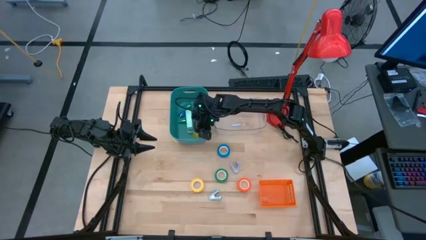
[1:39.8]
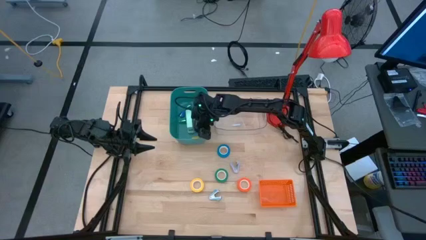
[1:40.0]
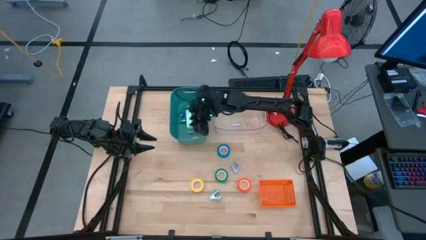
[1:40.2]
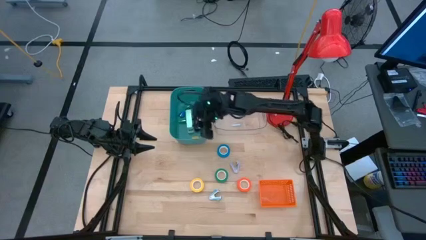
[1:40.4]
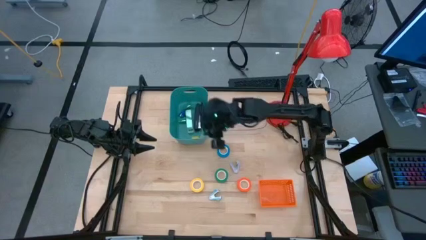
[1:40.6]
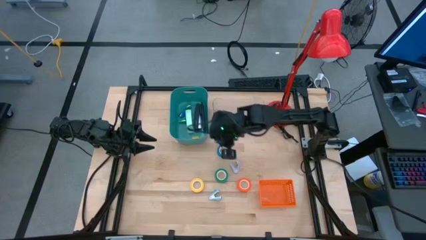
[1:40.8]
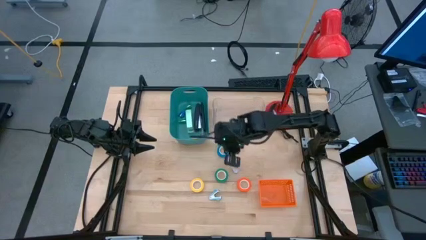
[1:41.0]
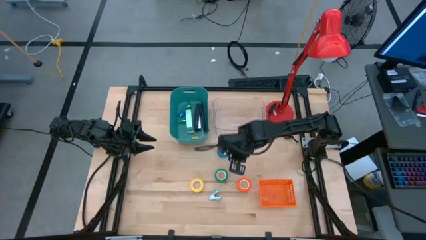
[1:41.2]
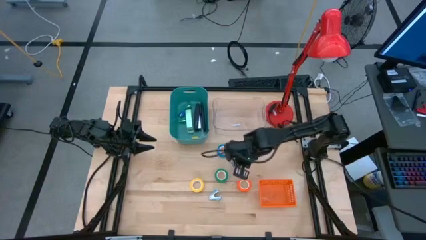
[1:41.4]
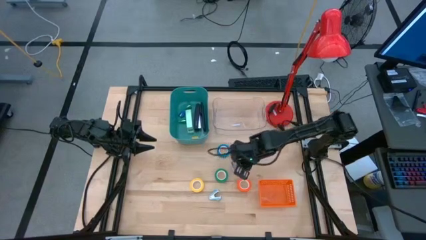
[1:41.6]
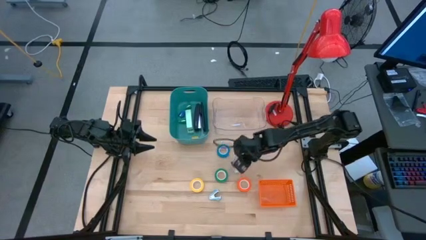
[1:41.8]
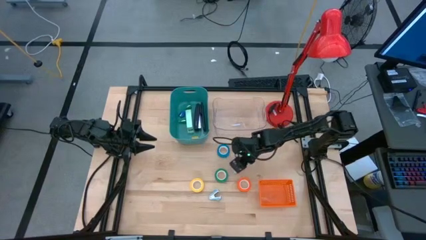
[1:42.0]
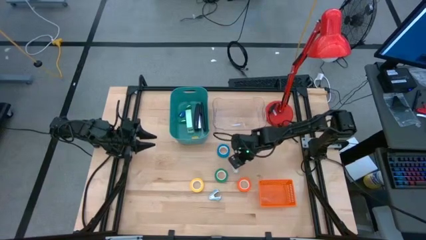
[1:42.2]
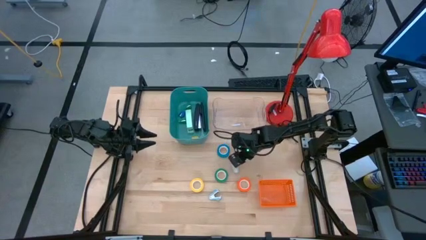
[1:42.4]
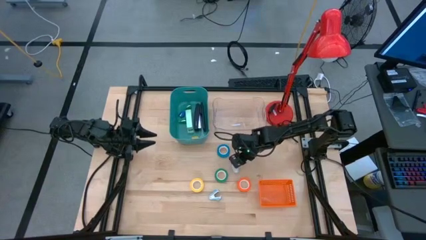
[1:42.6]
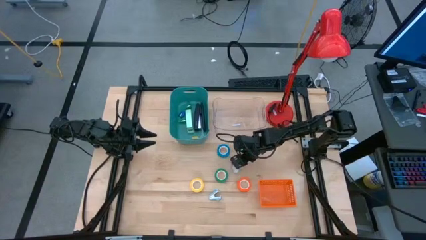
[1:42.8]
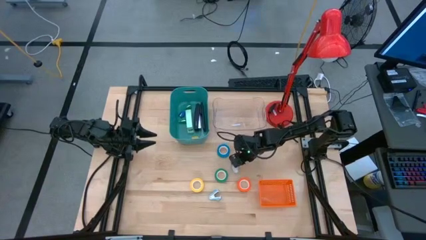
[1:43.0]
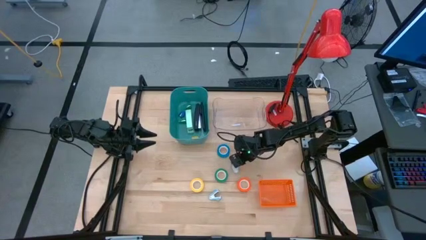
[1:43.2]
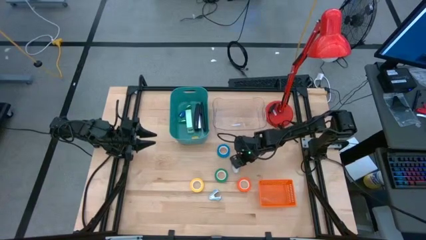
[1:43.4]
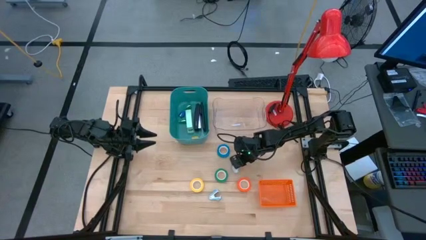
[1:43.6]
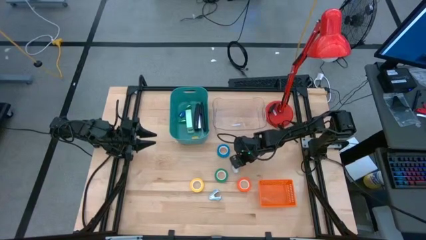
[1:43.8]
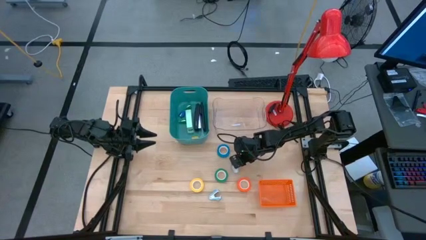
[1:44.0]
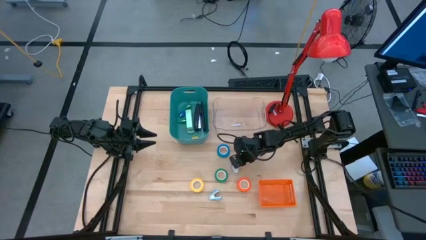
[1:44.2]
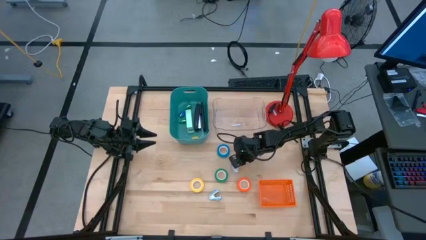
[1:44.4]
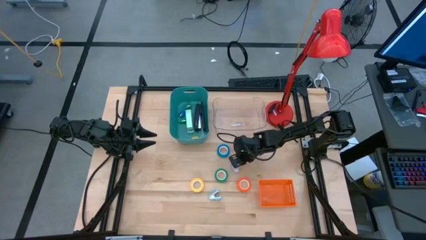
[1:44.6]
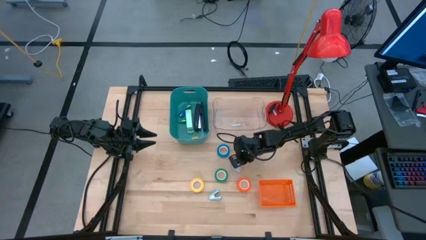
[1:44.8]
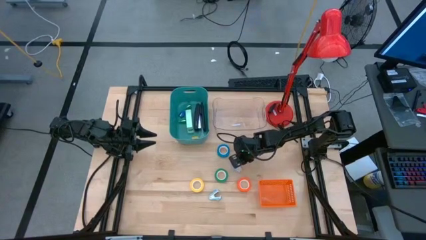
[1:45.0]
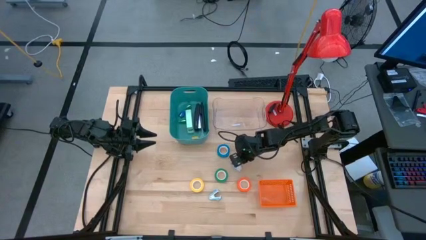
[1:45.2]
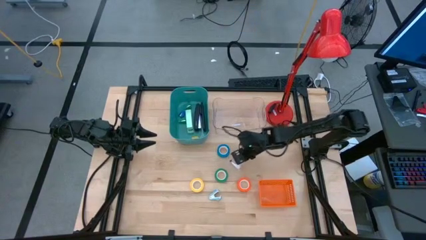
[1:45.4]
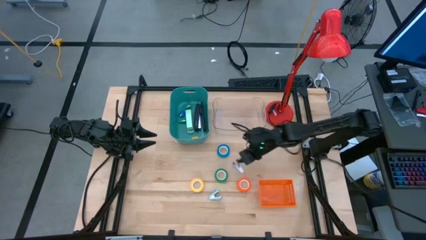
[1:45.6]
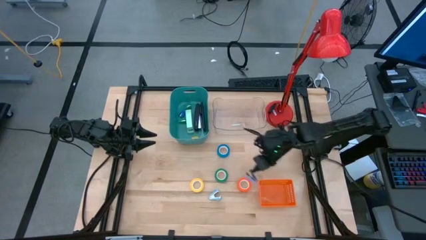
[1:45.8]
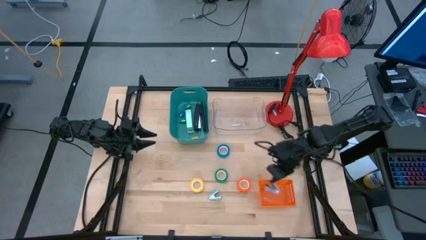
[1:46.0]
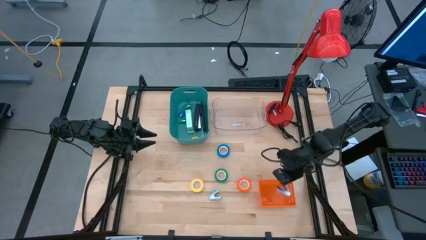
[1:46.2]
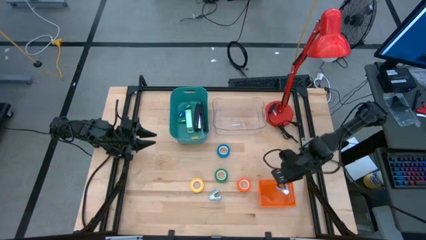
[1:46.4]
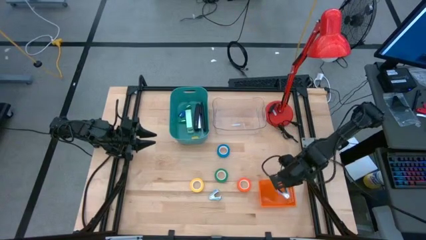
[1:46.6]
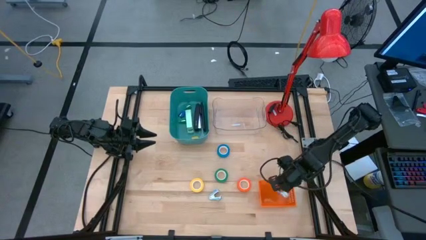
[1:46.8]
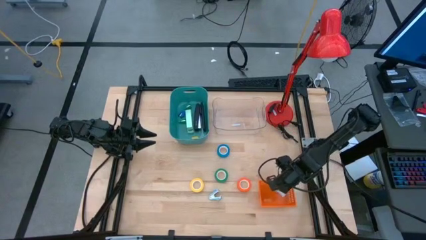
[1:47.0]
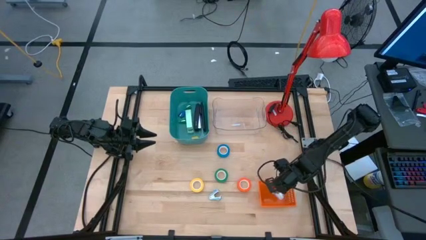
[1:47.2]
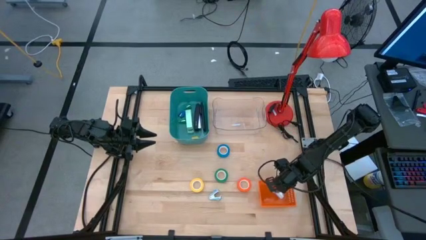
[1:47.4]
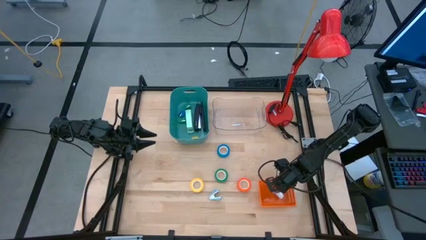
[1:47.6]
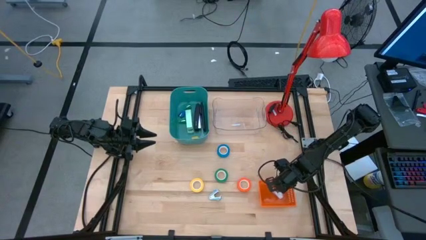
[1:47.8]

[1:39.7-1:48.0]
Task: Pick and place Stapler, Stapler remover, tape
Put the violet stapler remover into the orange bin

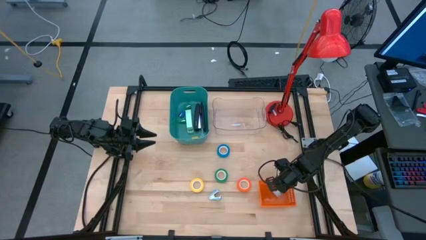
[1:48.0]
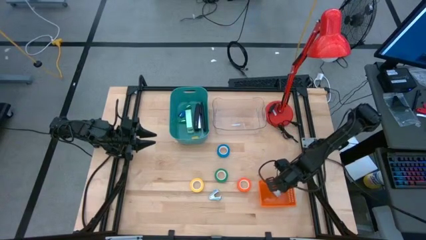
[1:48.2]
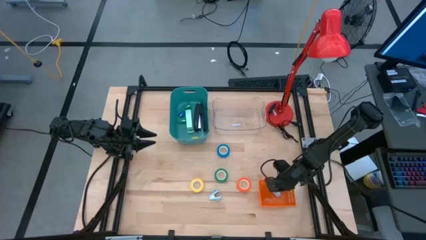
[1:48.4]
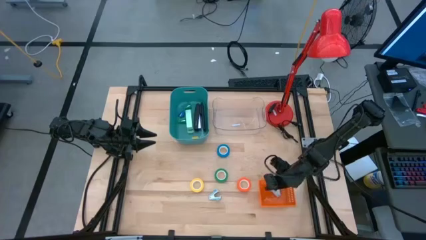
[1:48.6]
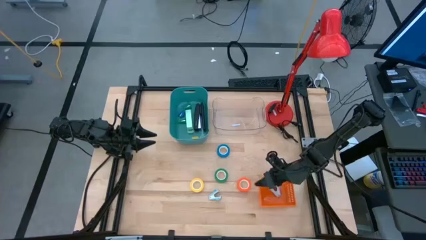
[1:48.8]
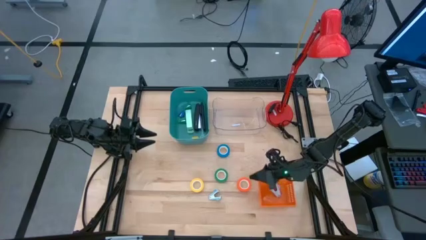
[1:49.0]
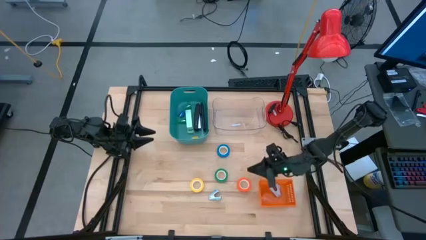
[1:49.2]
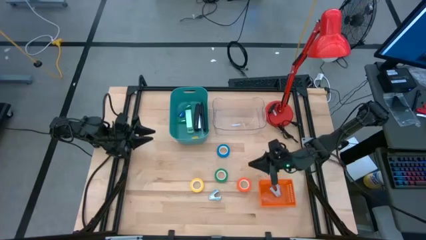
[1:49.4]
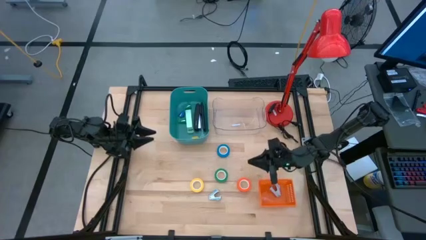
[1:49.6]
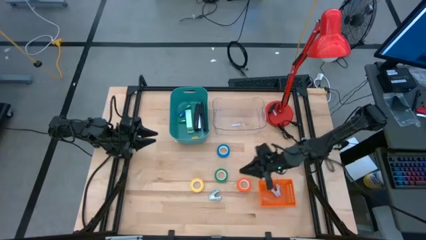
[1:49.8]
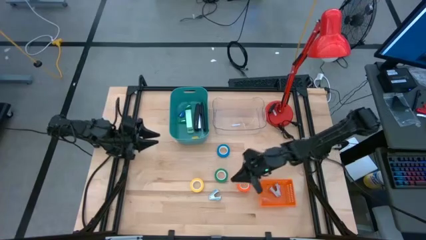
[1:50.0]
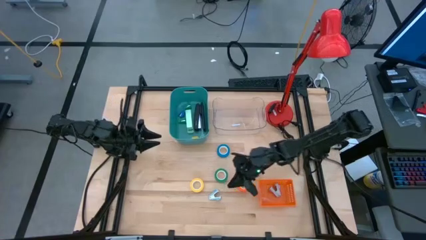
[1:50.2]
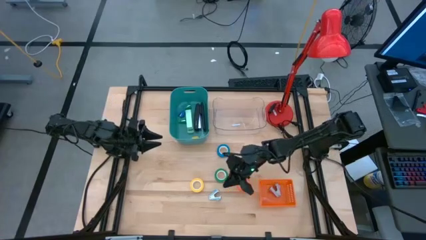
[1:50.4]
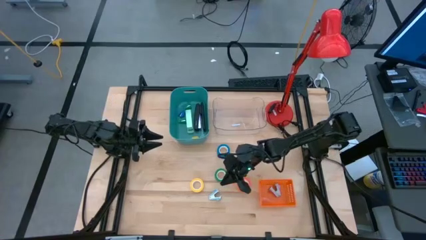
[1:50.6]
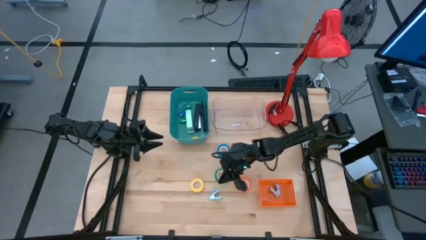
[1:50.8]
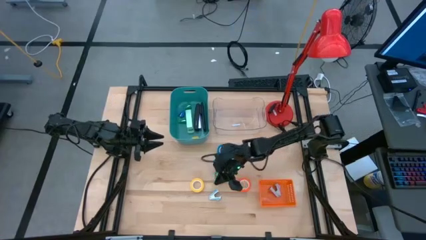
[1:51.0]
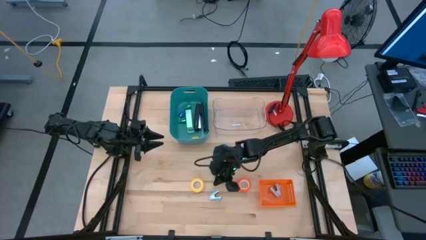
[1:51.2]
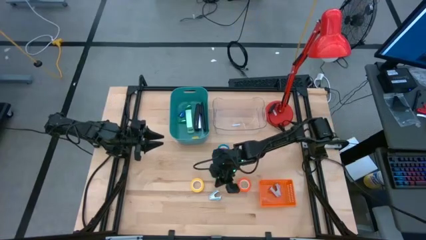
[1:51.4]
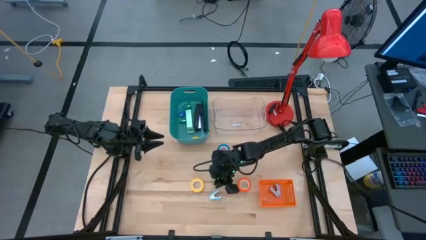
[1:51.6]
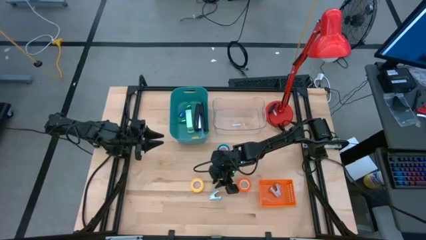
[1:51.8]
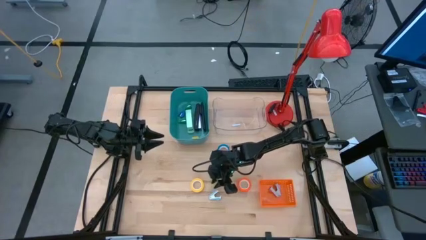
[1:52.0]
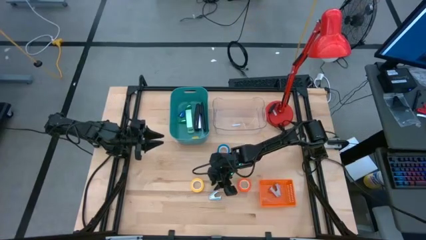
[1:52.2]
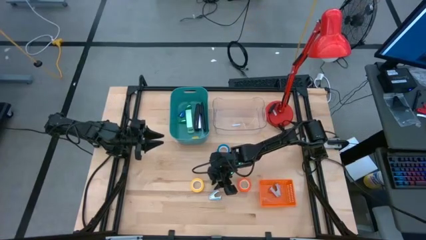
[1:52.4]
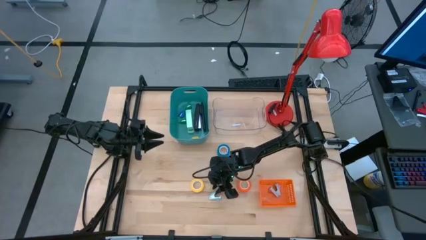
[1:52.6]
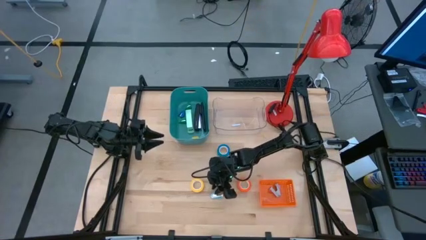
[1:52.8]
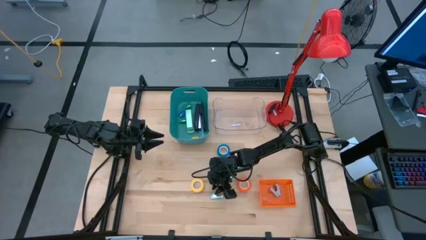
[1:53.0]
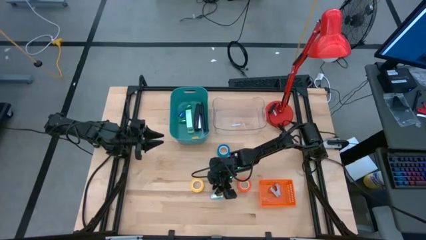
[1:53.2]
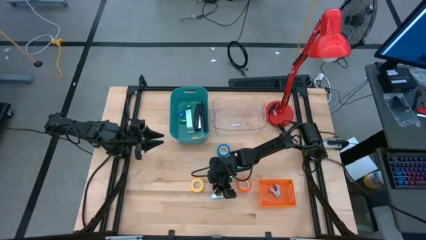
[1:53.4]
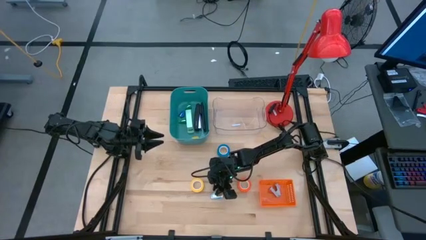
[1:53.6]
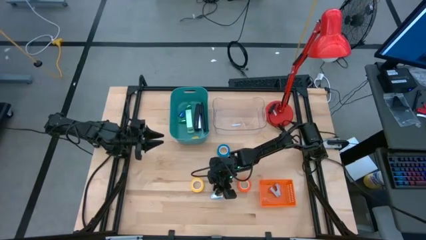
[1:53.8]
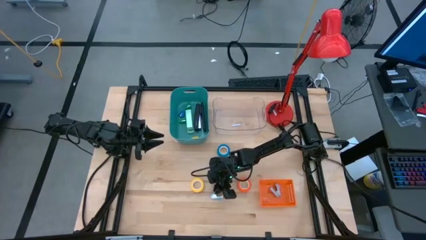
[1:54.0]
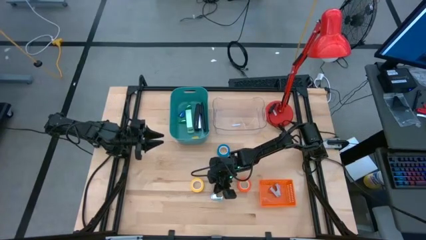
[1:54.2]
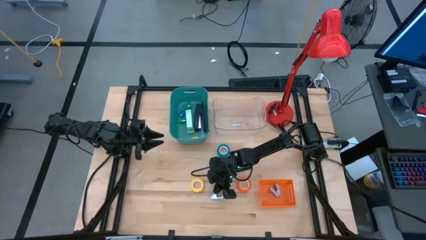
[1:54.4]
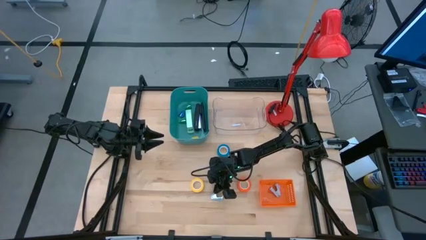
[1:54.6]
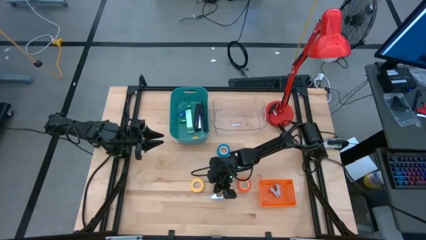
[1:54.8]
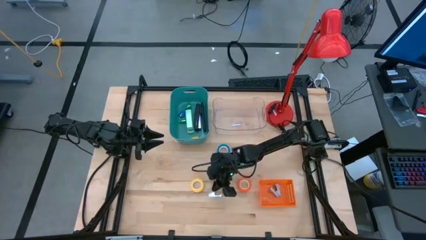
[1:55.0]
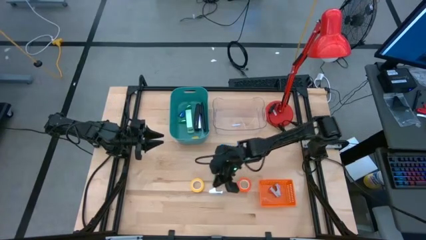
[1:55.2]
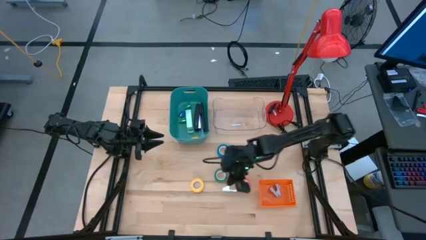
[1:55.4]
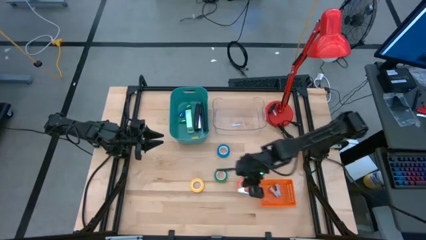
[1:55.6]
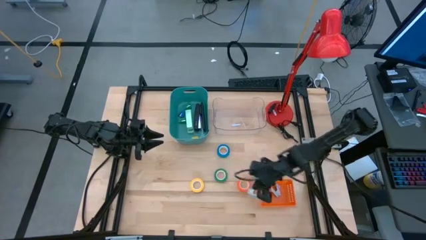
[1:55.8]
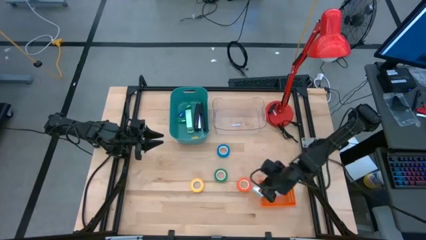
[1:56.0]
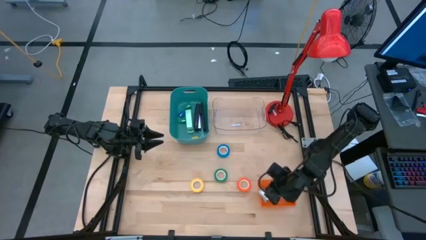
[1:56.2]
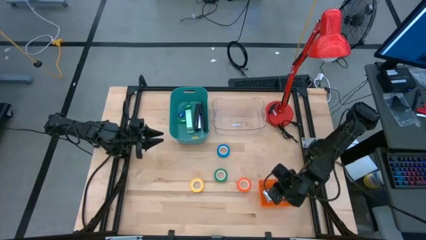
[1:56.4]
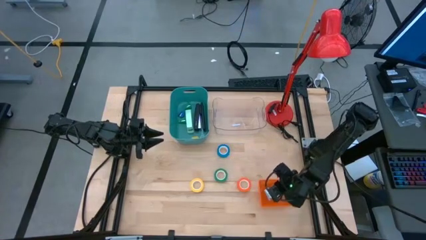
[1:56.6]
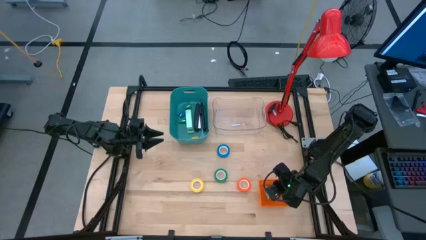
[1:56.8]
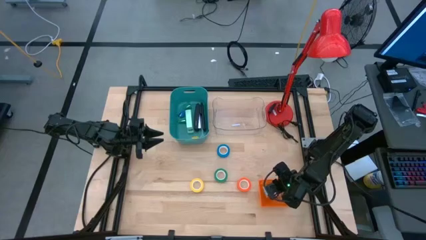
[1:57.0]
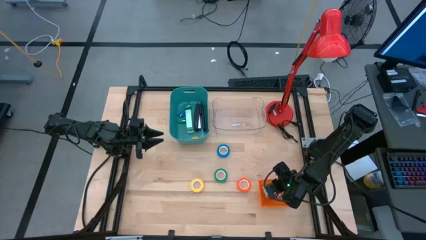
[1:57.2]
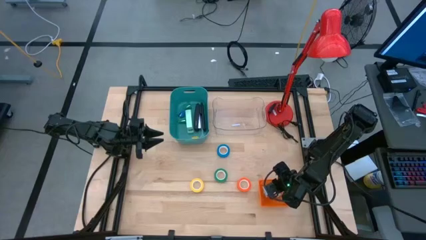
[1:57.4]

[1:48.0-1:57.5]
Put the light blue stapler remover into the orange bin
